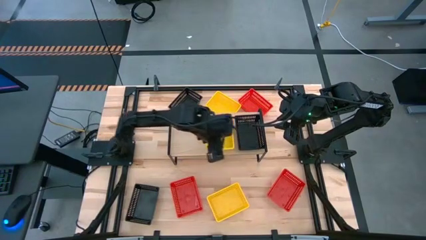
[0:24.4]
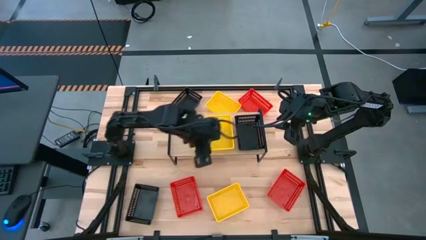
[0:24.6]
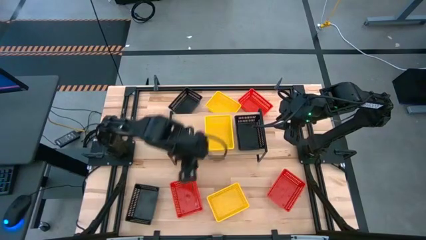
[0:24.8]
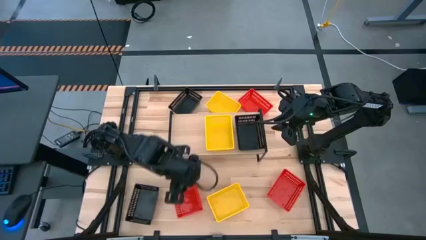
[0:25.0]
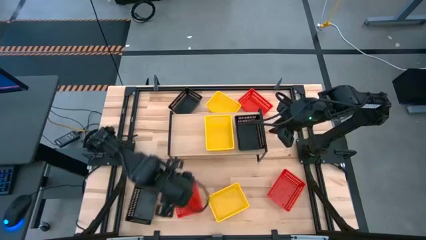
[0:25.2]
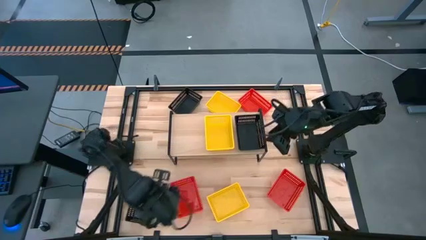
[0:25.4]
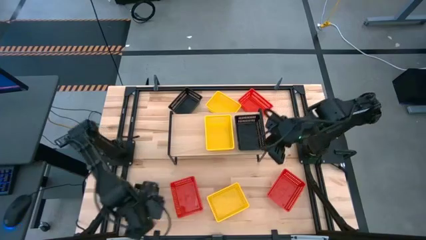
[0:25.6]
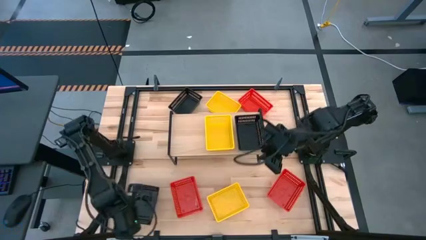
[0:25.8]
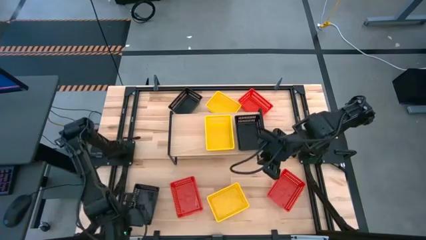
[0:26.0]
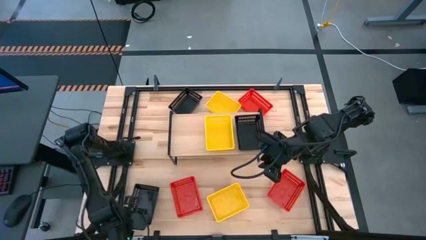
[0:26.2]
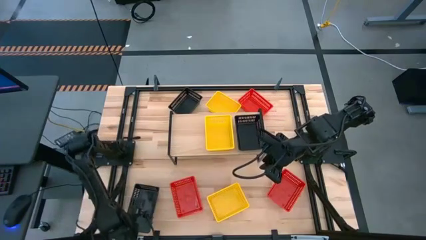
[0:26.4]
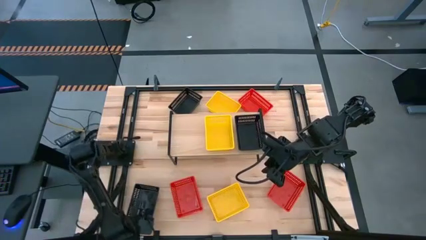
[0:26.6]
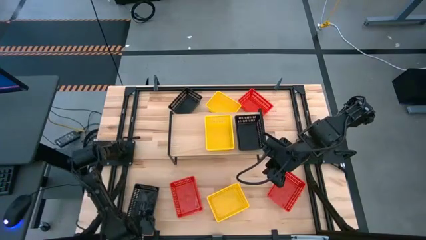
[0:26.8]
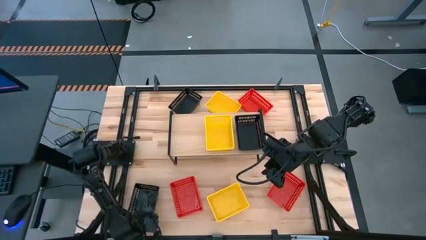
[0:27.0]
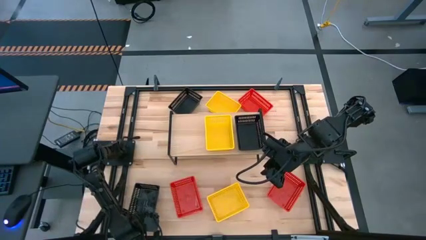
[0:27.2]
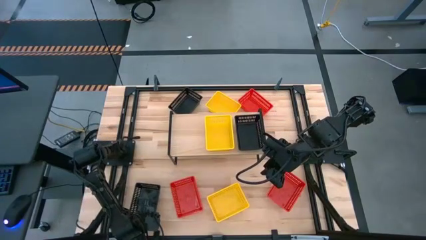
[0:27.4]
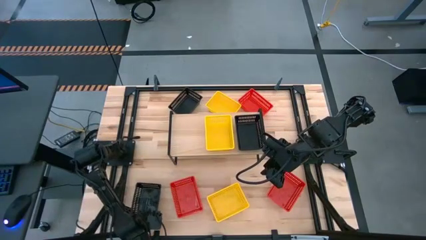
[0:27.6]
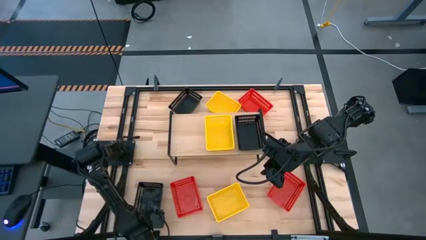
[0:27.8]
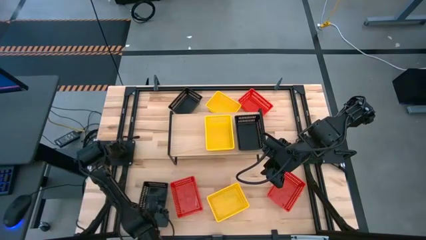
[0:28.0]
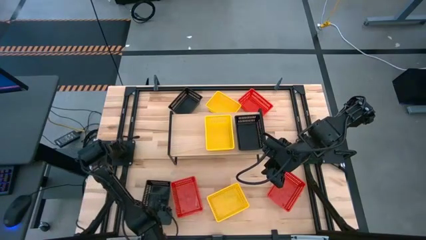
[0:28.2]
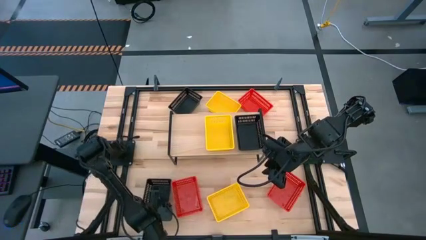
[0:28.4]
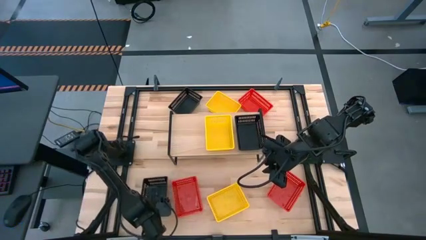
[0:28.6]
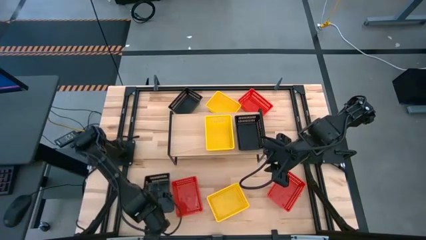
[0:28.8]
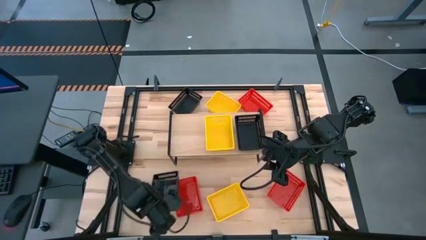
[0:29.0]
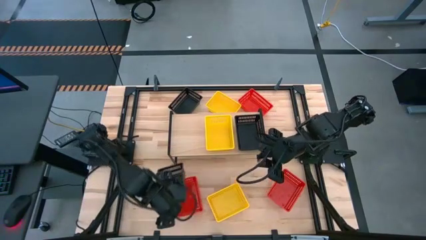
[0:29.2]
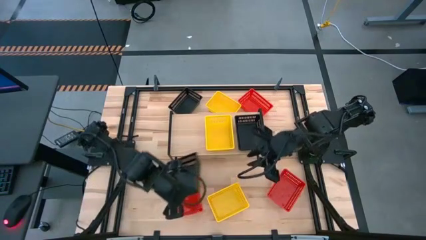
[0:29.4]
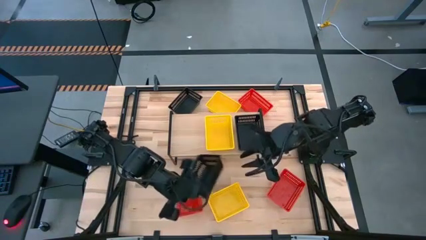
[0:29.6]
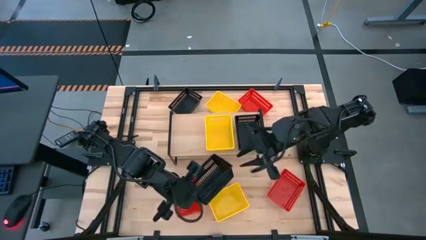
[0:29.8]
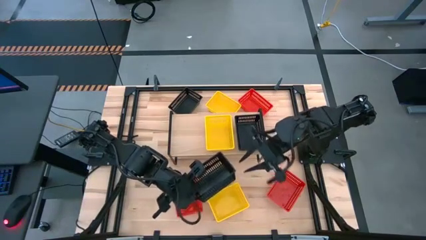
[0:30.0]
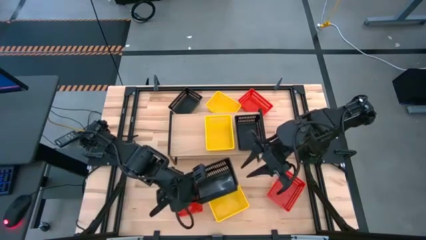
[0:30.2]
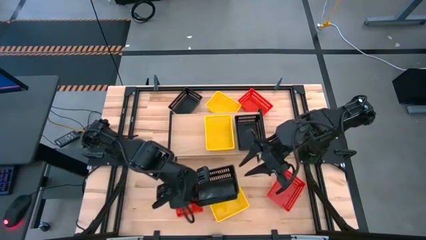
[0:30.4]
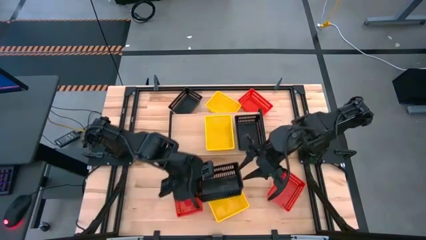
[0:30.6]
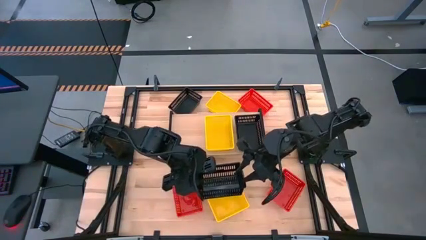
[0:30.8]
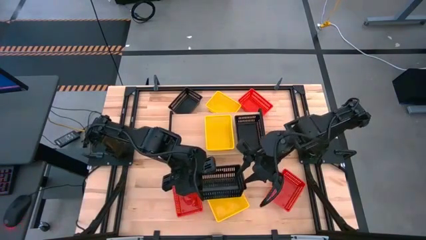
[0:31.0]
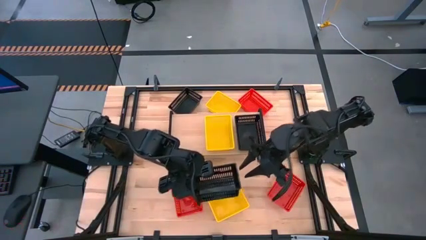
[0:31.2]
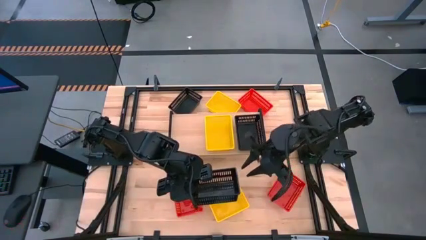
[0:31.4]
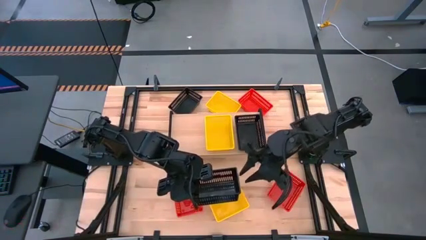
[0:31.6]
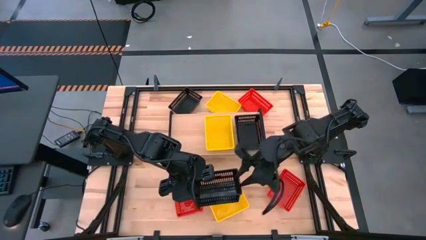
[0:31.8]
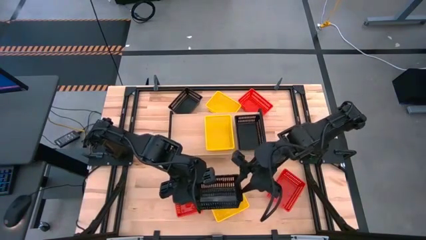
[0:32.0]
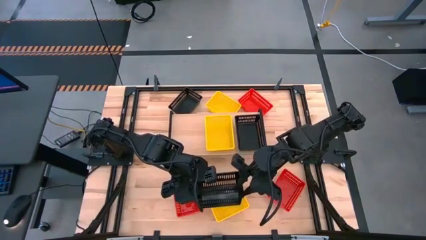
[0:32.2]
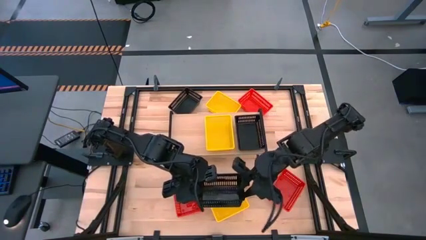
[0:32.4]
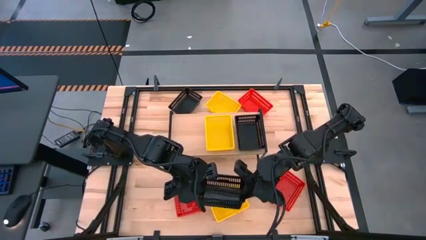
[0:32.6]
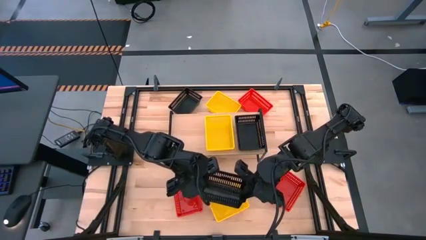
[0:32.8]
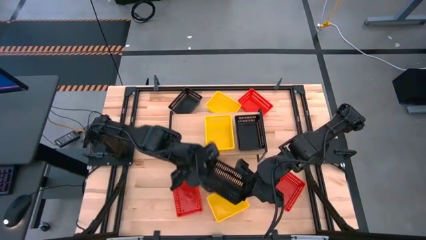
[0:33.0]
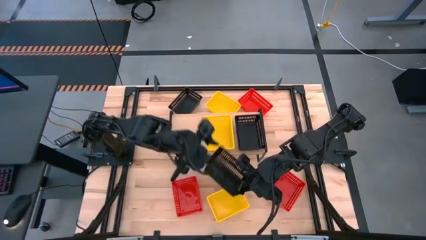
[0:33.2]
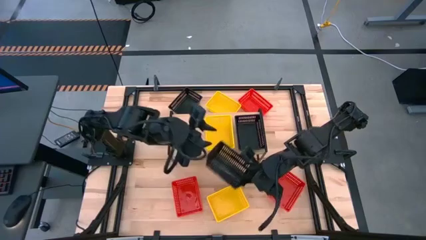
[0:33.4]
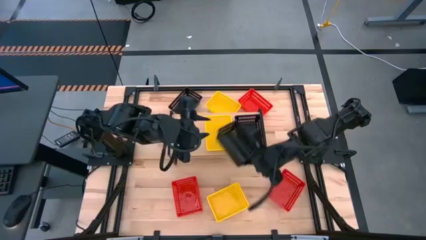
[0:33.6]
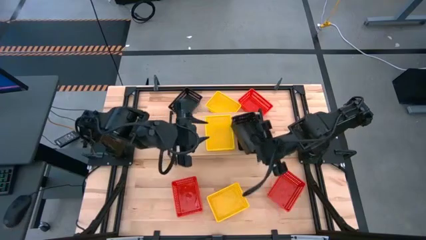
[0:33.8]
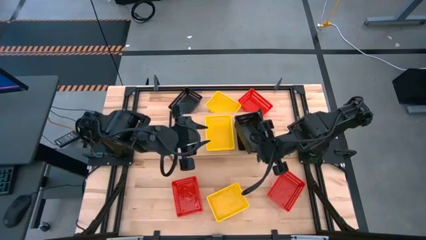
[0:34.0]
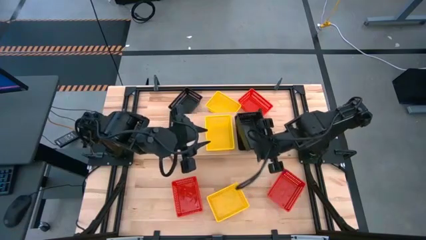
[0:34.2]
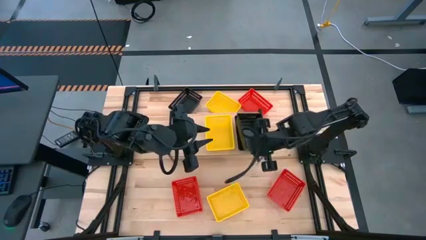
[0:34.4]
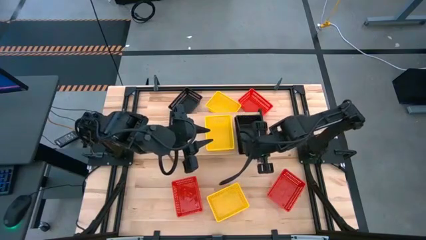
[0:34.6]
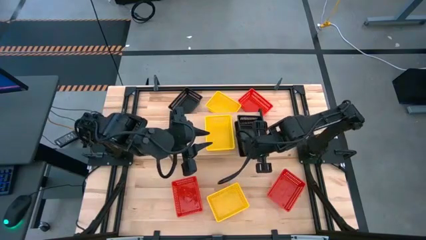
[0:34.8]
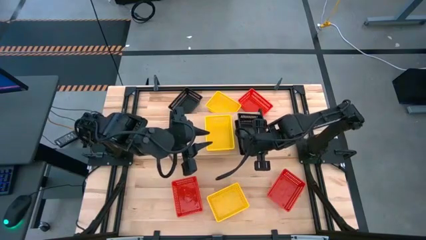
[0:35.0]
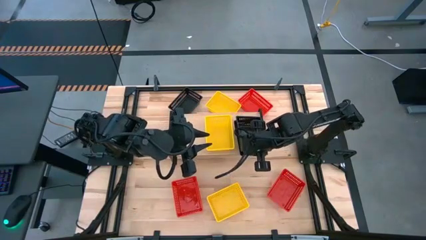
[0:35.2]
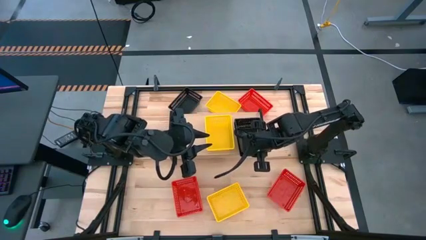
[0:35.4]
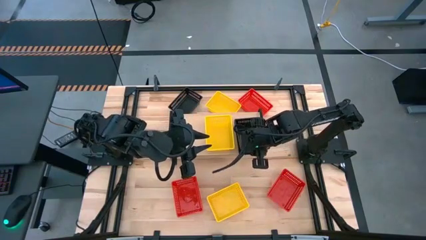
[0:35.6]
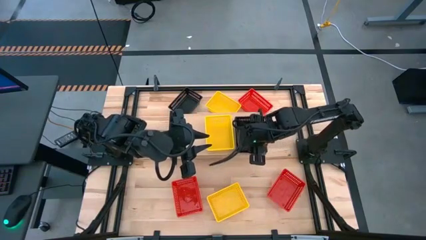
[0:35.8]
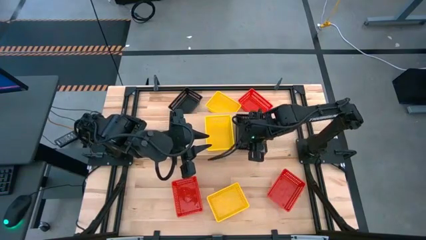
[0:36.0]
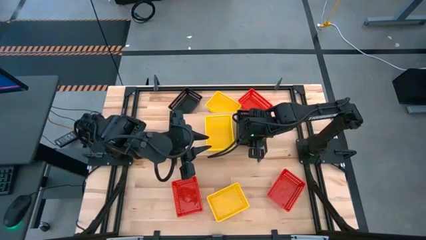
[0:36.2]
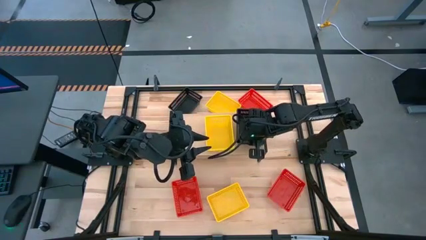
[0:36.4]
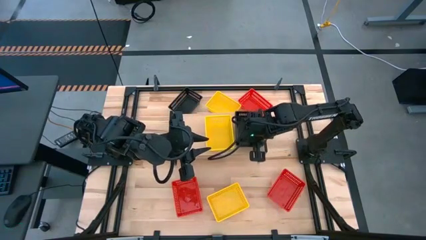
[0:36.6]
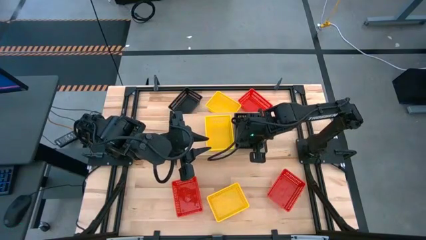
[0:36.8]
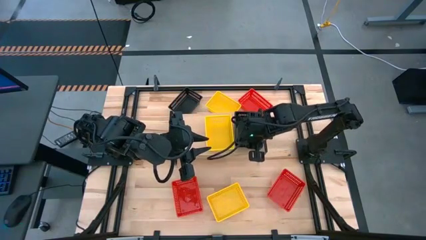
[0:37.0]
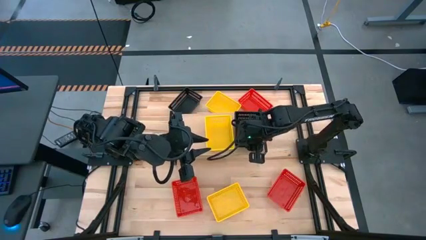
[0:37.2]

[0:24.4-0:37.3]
Task: Stack baskets on shelf by color
Stack the bottom black bin on top of the black bin on the shelf

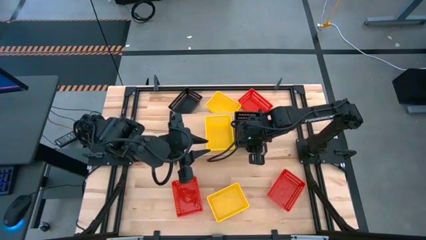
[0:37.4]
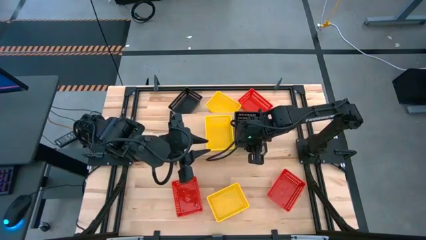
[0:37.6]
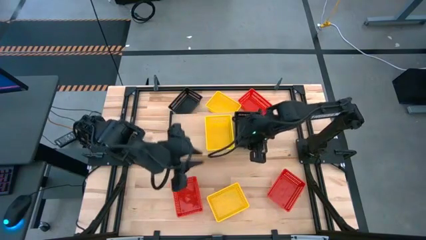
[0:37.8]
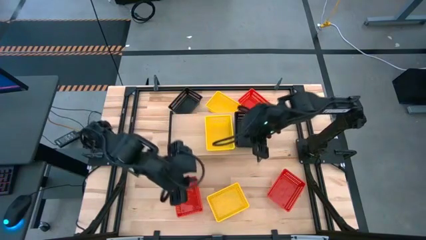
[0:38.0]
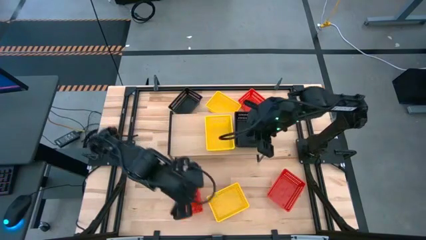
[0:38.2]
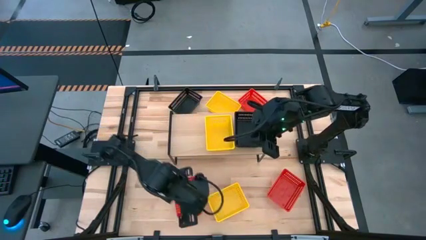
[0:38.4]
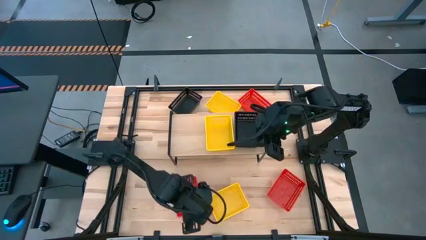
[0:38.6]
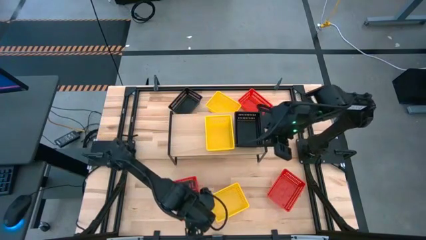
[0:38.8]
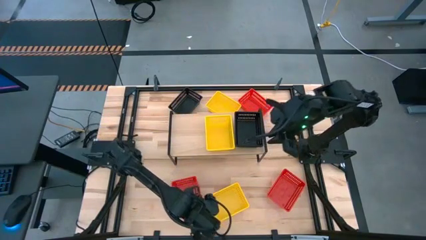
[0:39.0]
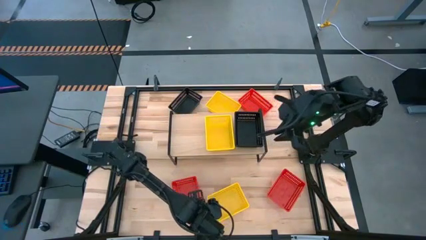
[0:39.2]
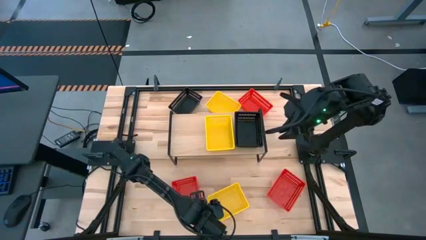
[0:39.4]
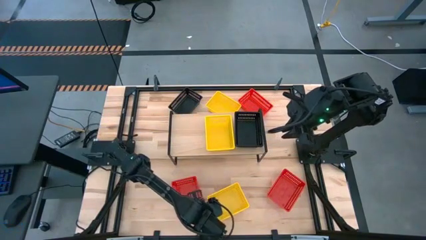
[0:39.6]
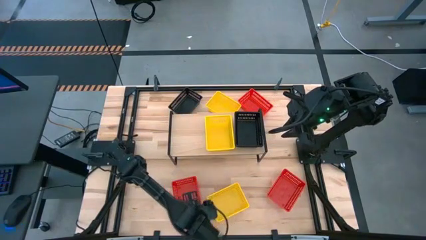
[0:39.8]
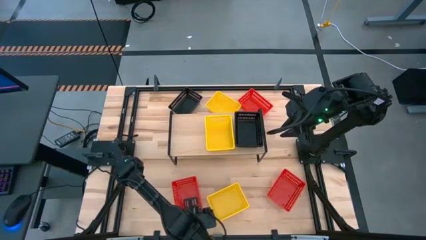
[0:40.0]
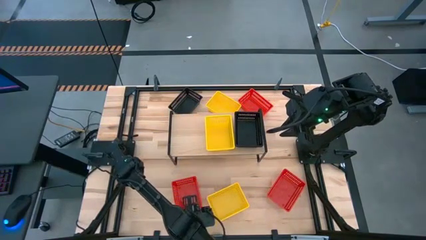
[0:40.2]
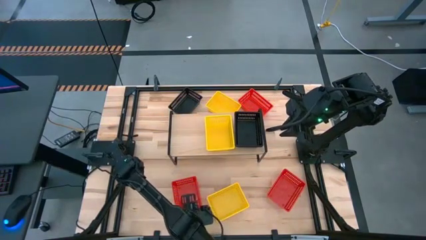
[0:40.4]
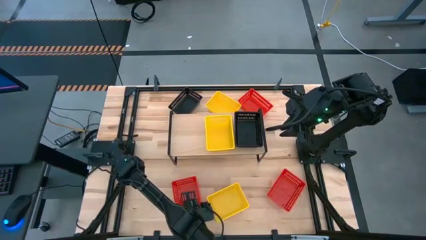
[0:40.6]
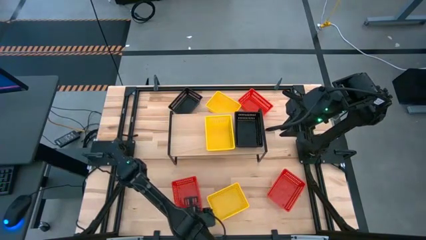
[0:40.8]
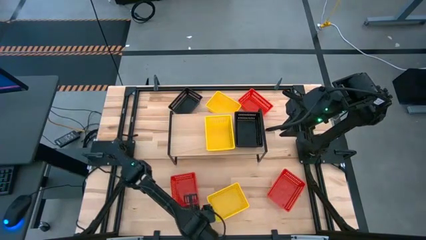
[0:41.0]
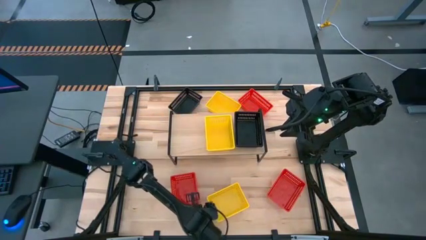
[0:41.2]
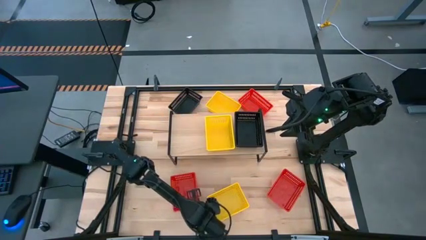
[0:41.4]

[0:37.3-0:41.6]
Put the bottom left red bin on the shelf
